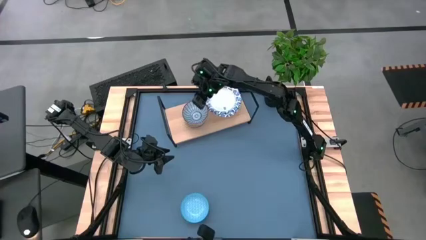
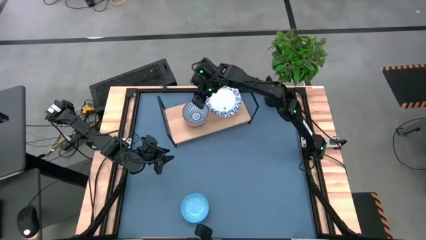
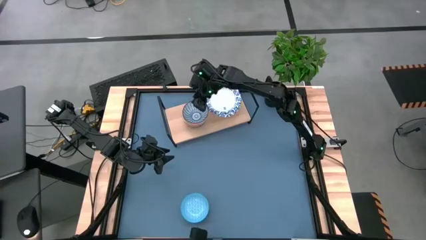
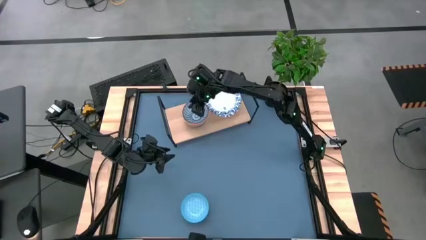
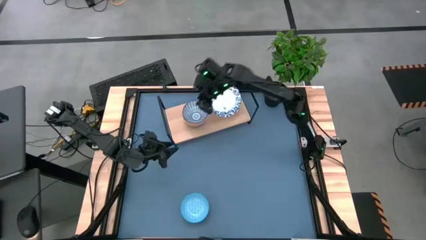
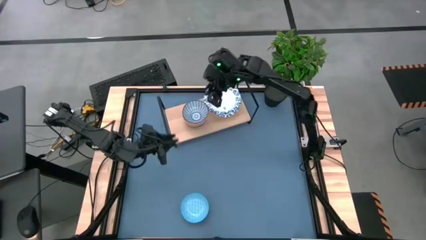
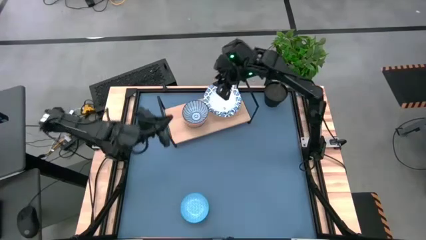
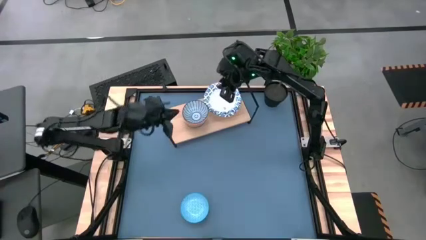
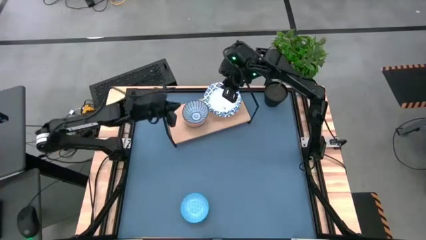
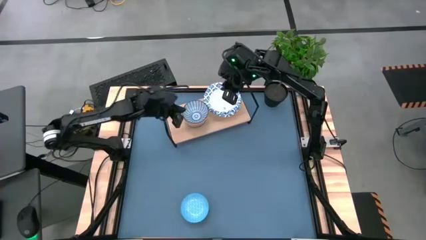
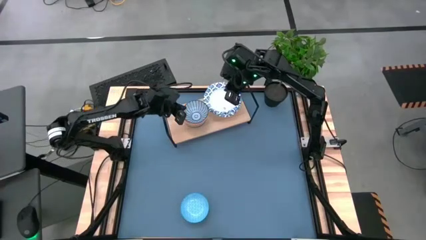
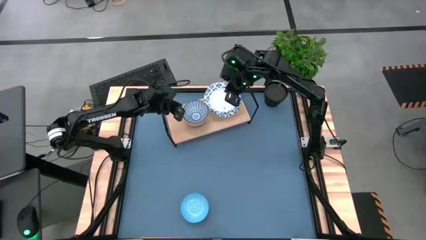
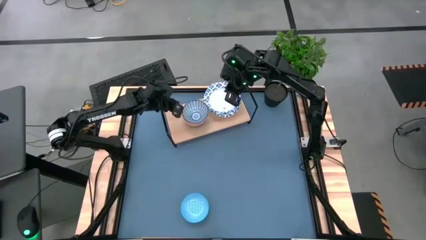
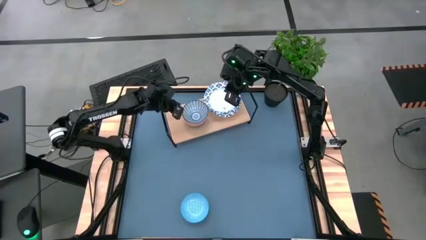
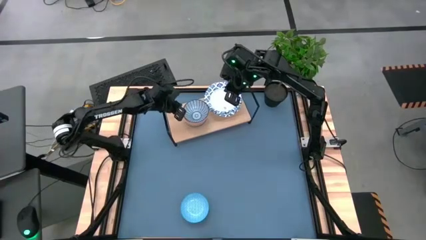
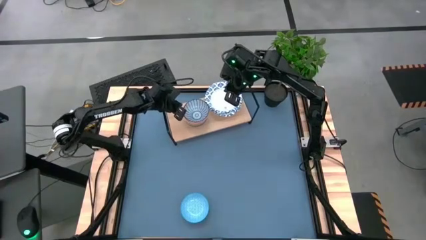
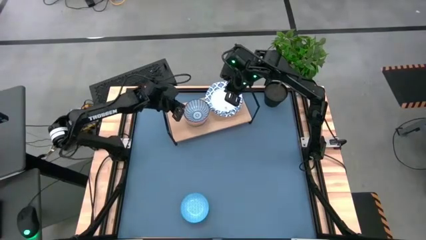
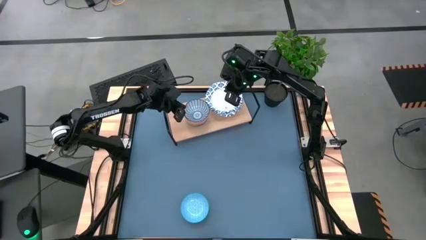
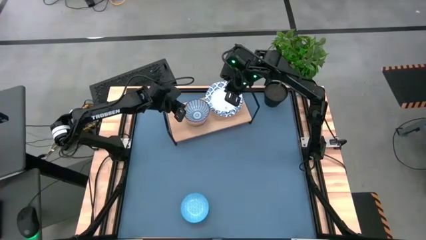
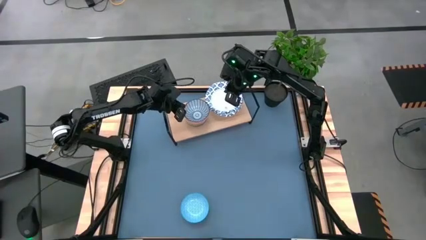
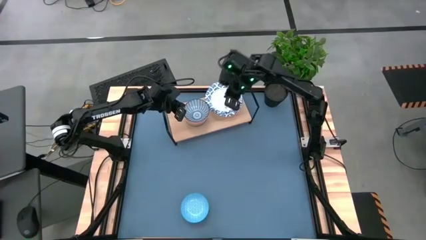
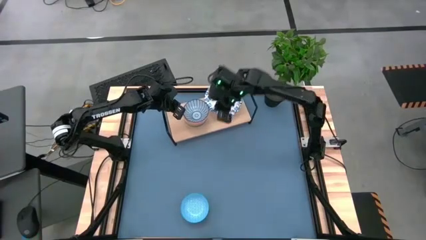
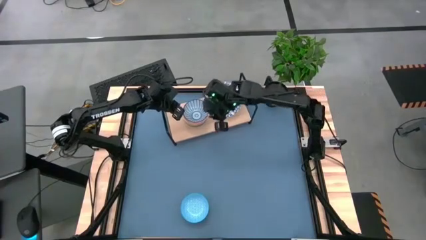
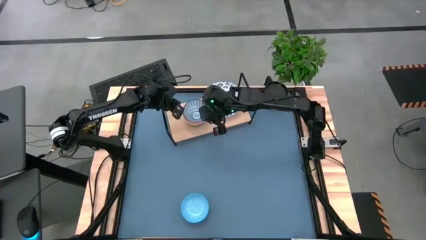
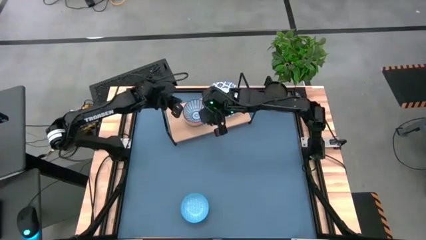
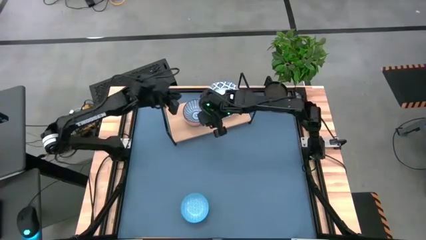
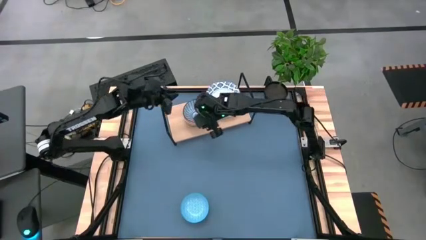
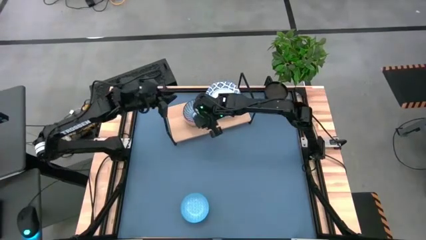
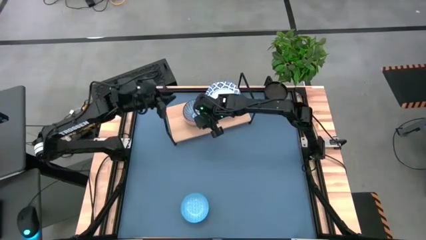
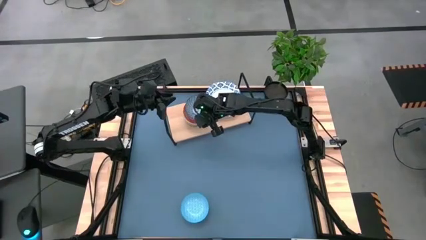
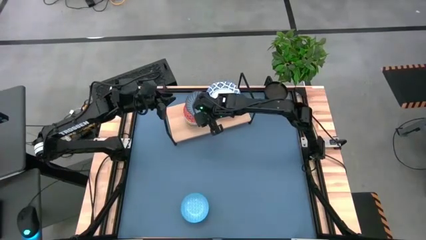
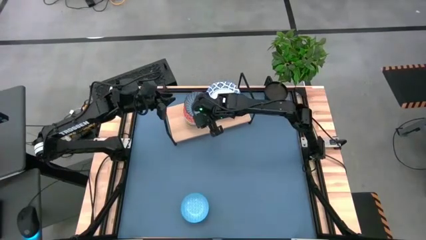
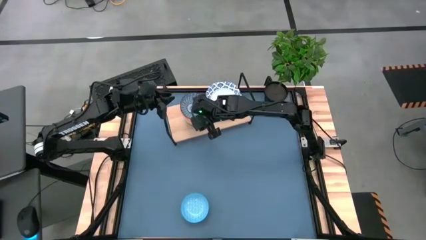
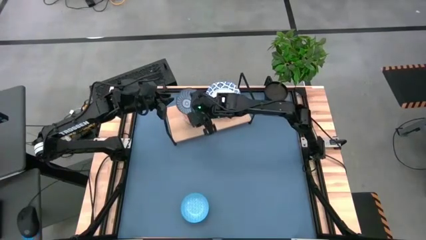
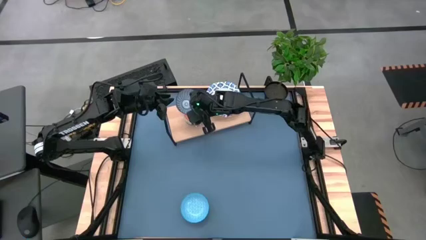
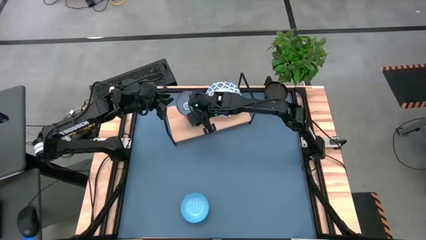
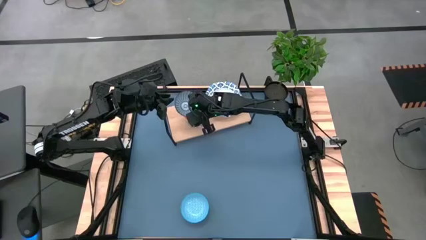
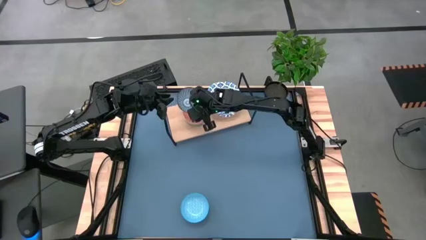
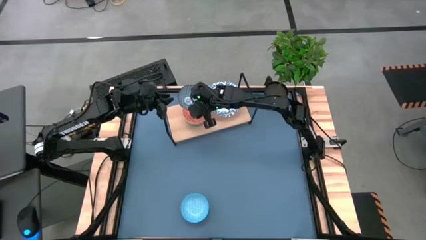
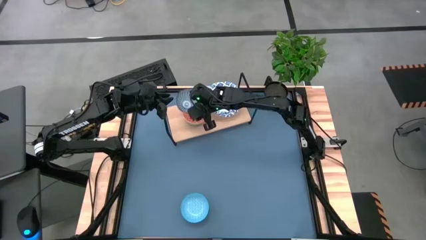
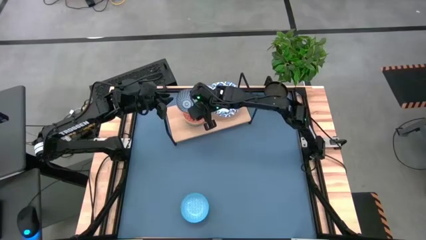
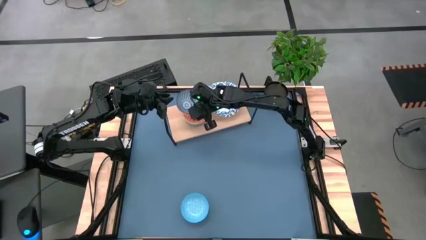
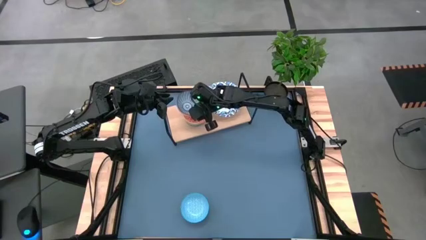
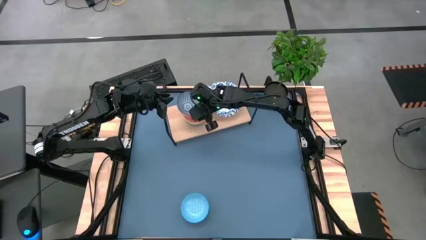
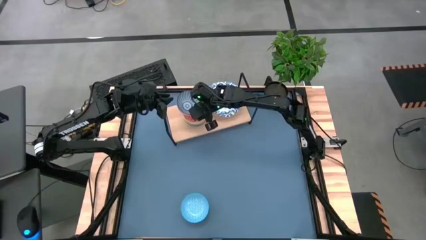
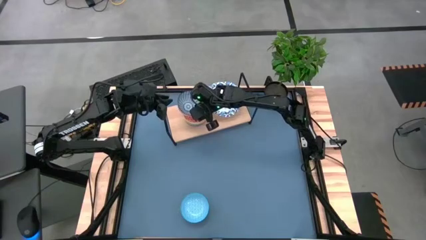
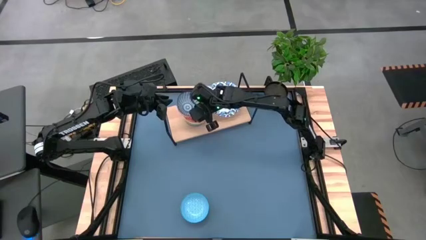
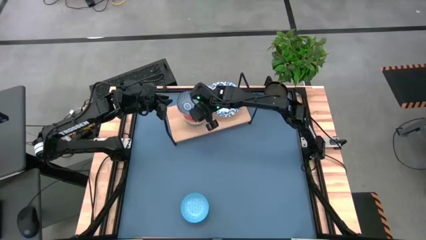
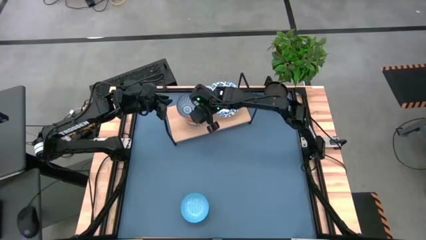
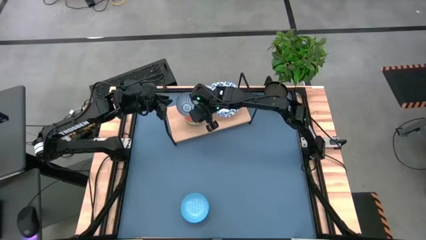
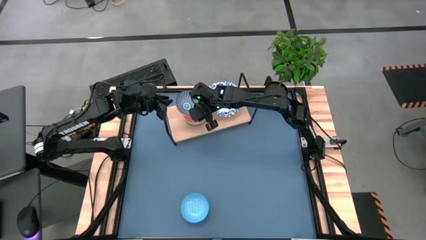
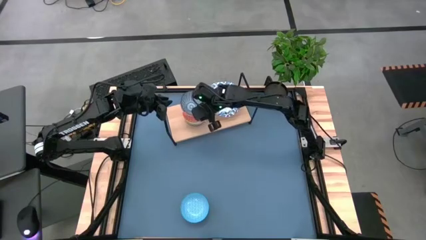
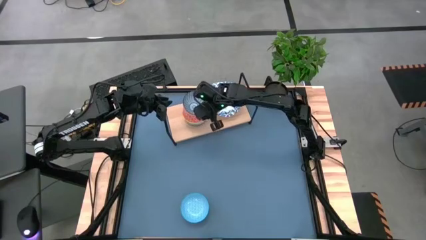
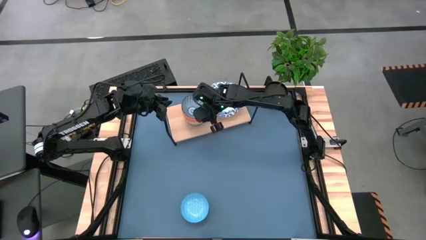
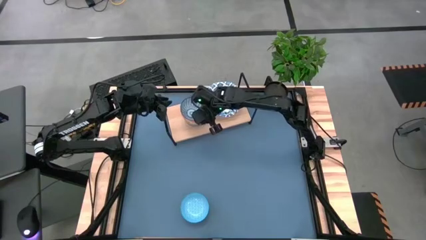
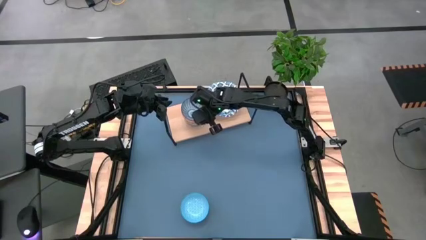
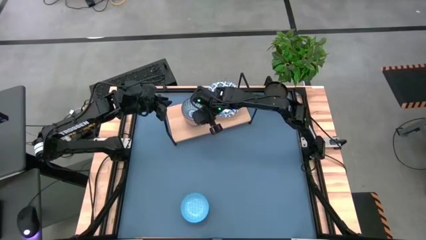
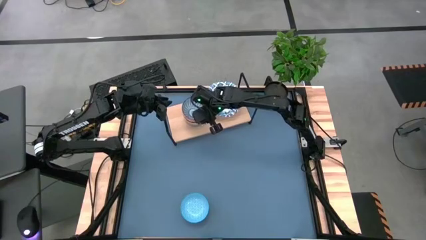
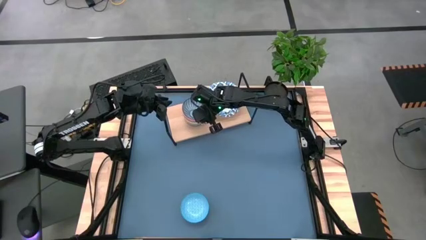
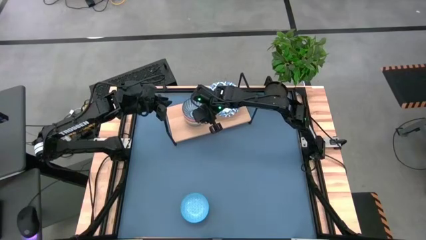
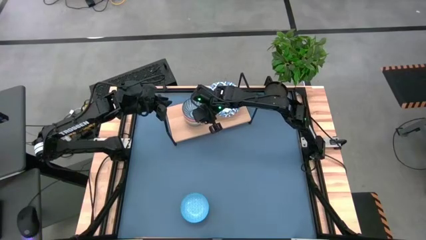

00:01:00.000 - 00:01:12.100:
Task: Place and stack bowls onto a shelf
Adjust the left stacked bowls on the shelf

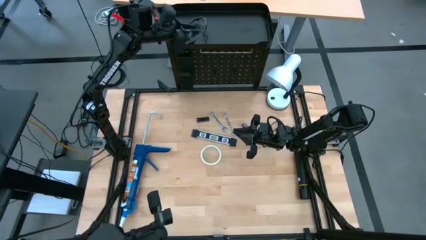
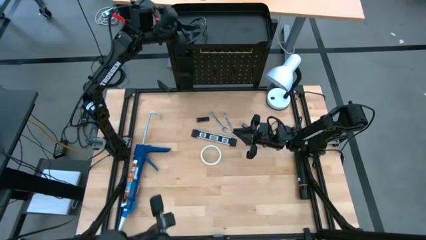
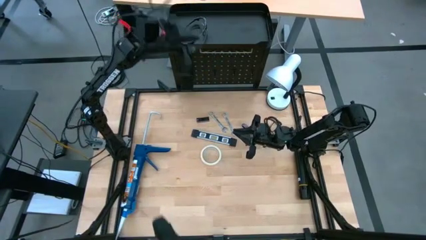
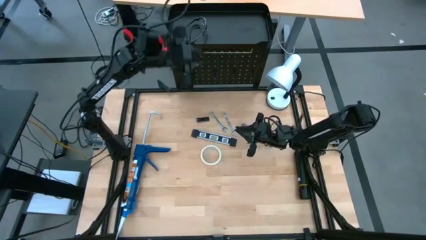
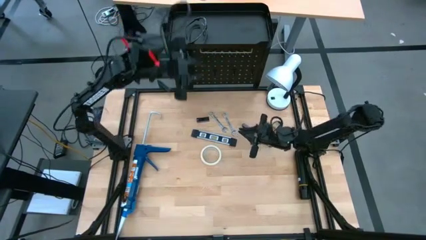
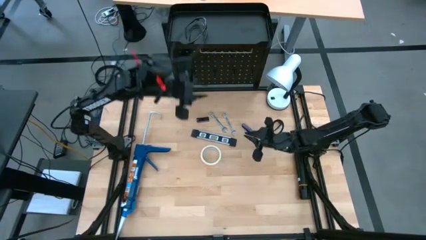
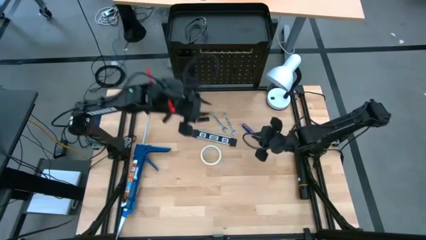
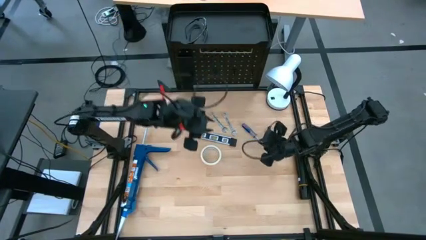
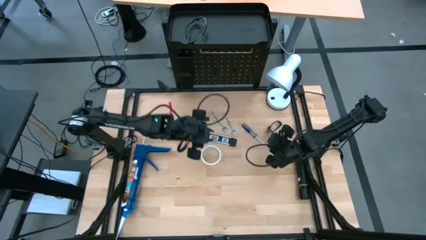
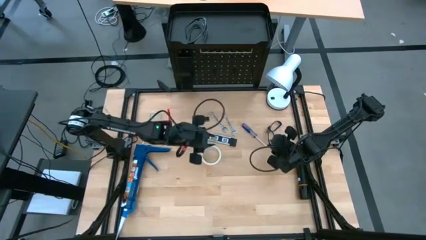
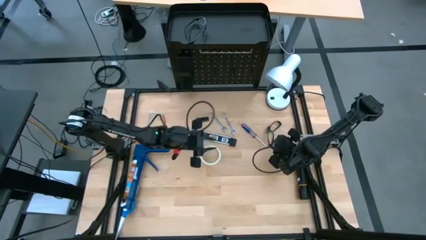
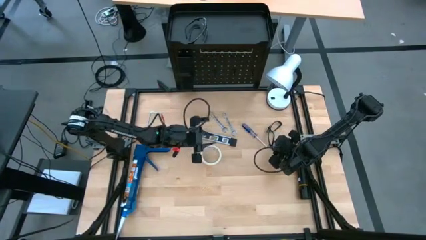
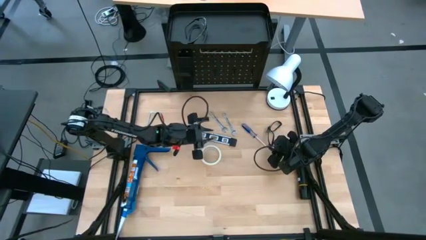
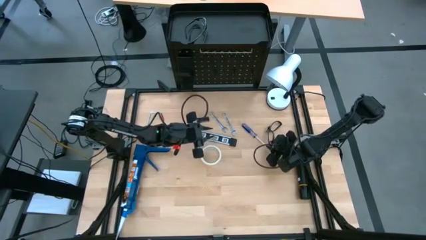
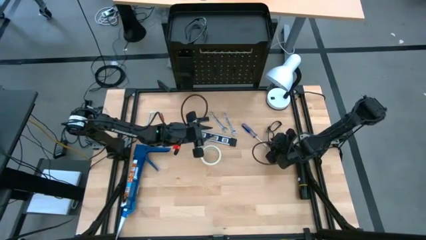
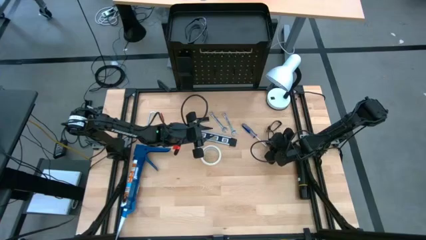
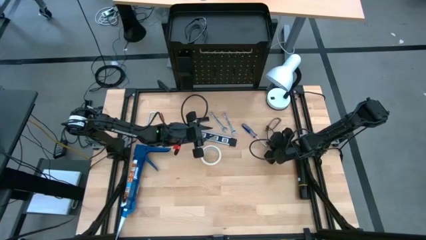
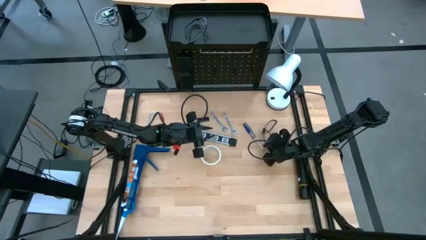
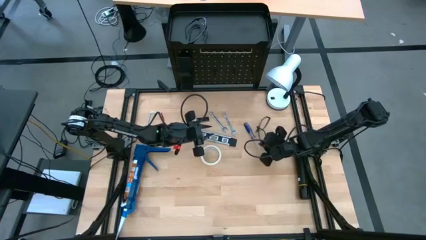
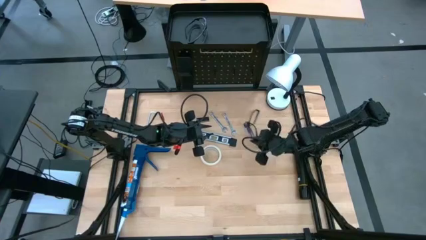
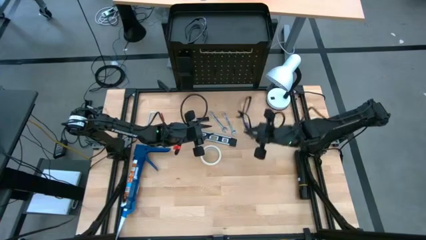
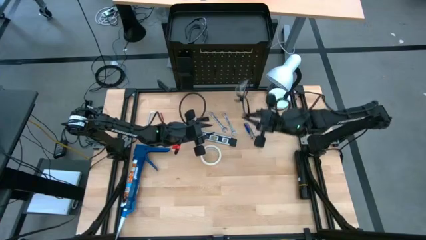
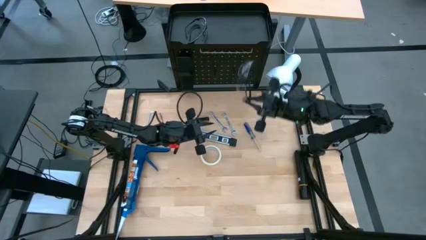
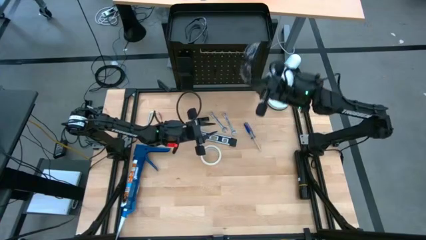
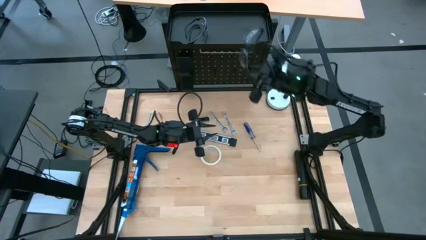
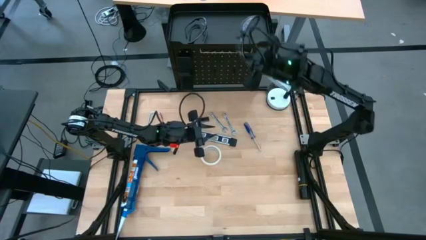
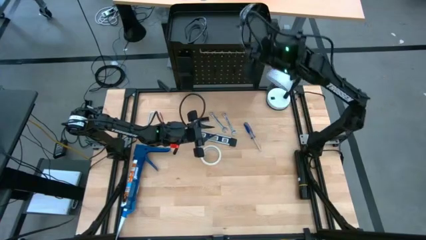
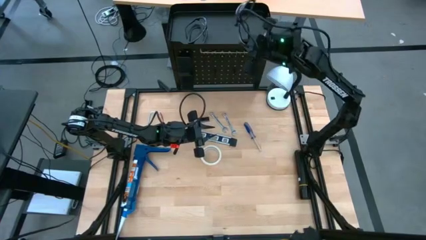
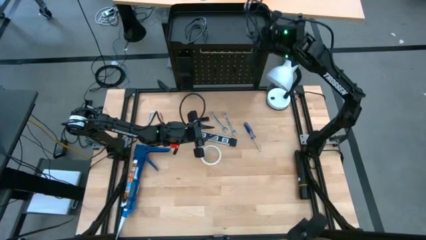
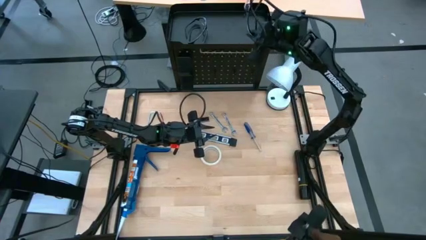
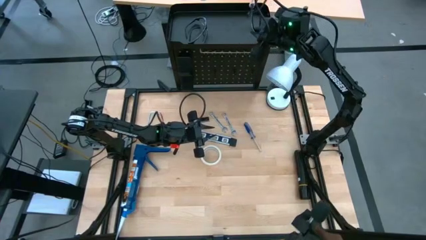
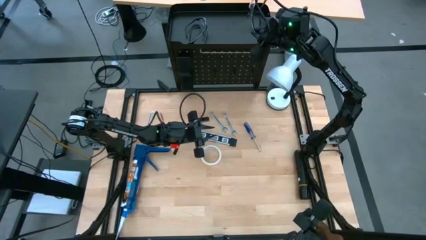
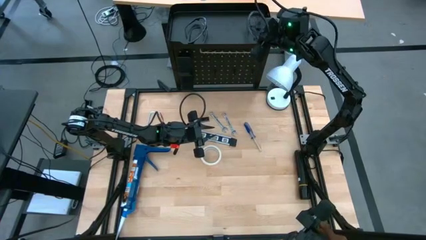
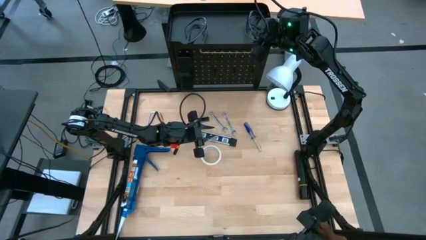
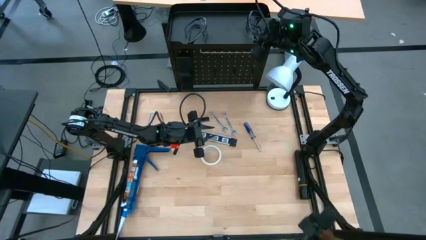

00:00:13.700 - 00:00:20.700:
Task: Hang tools onto peg board
Put the safety glasses on top of the pegboard
